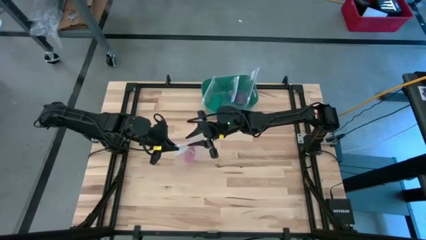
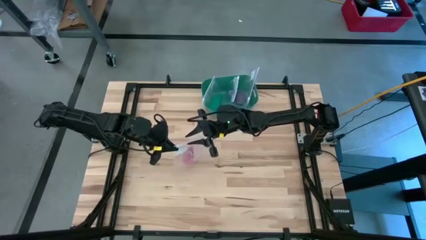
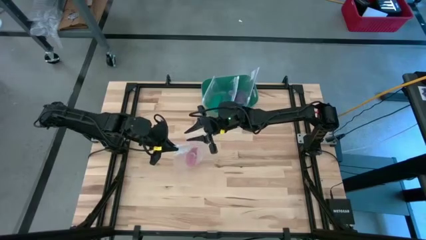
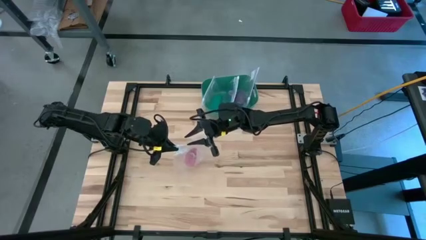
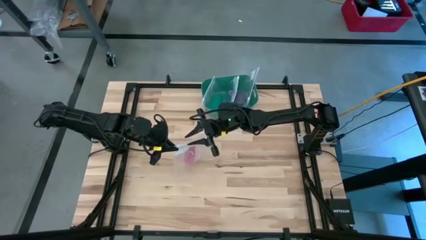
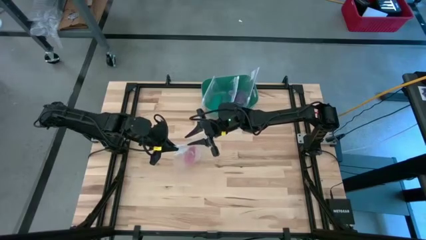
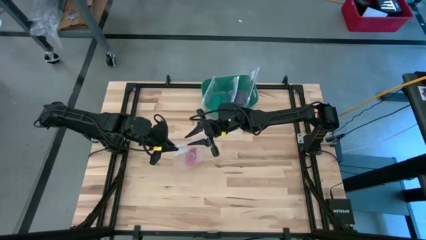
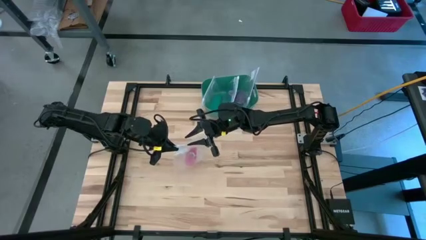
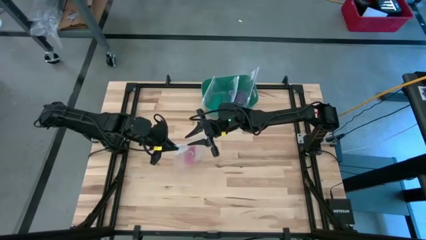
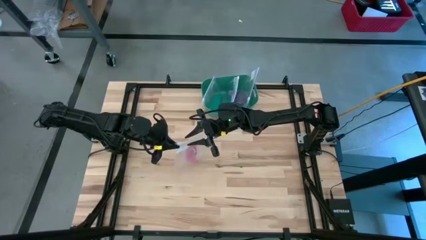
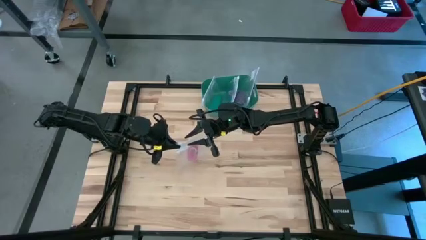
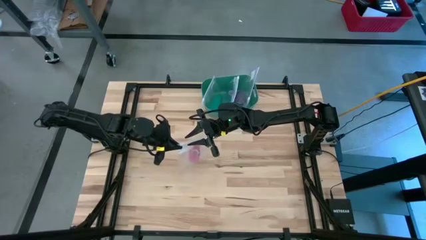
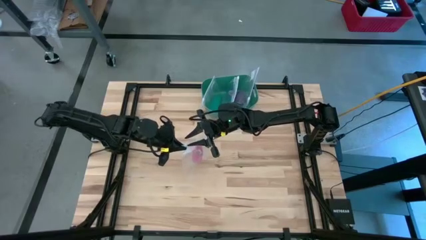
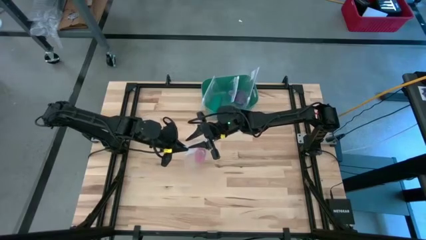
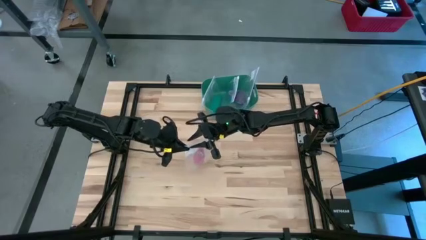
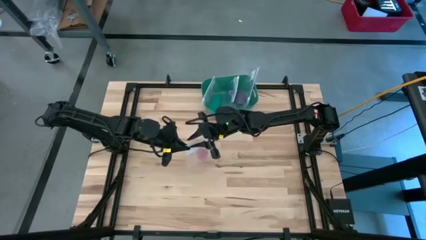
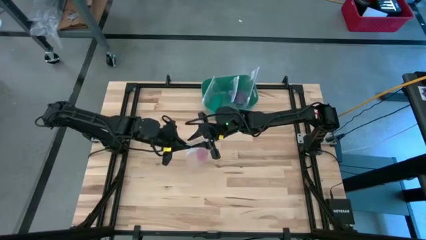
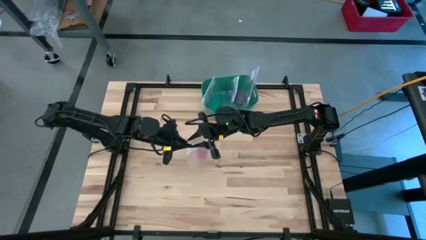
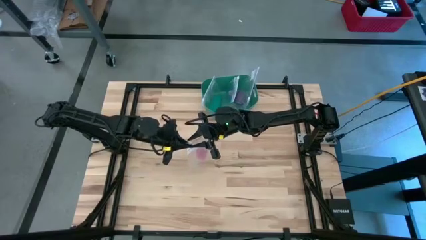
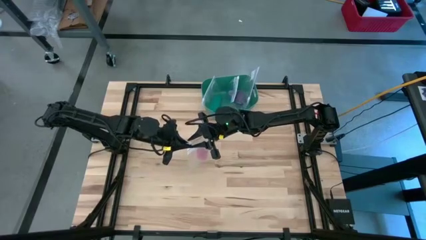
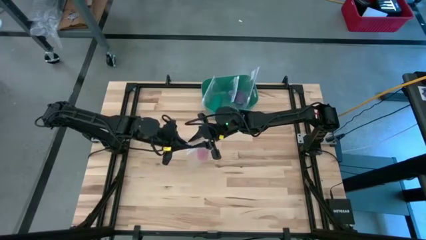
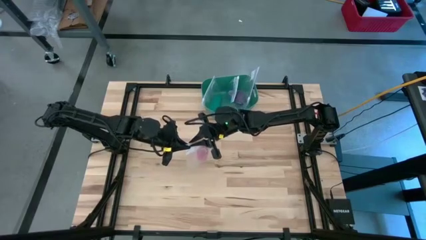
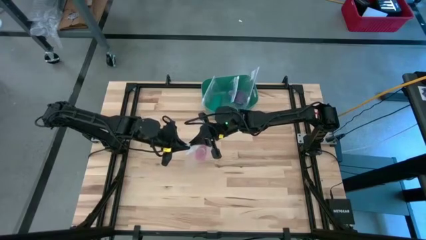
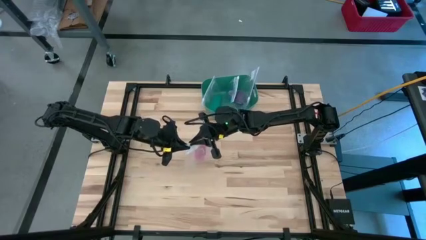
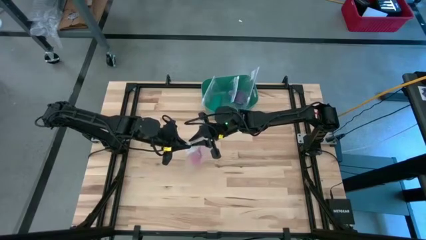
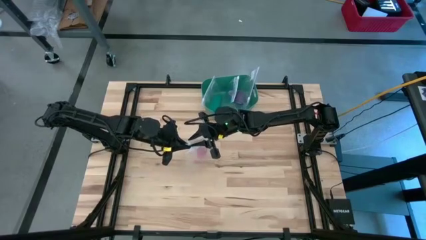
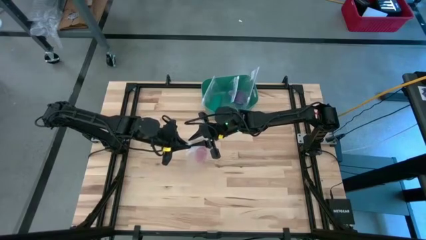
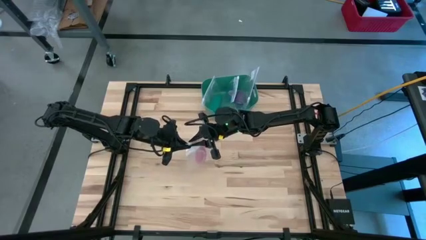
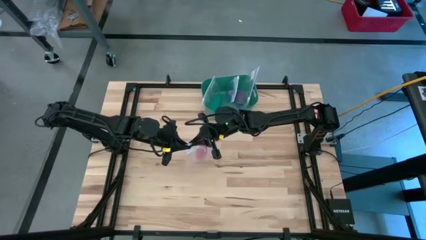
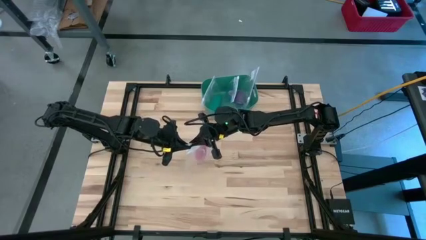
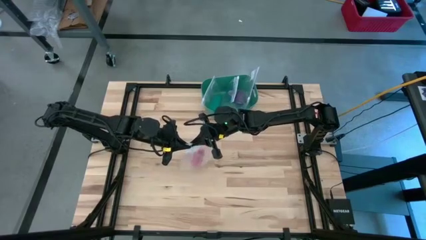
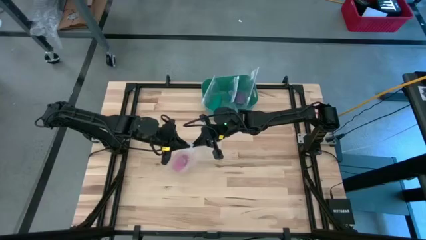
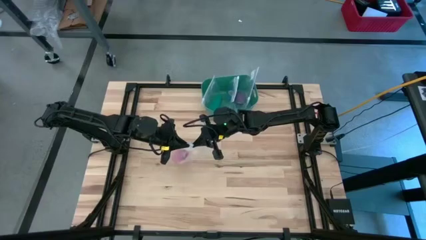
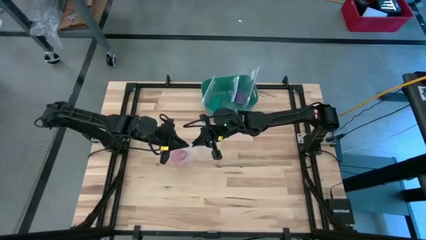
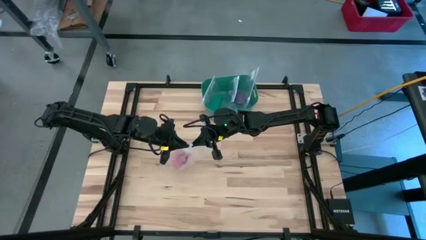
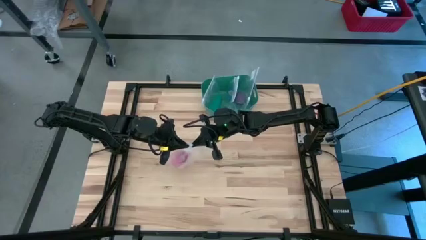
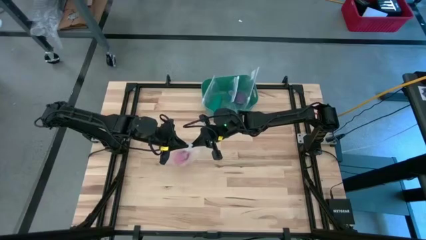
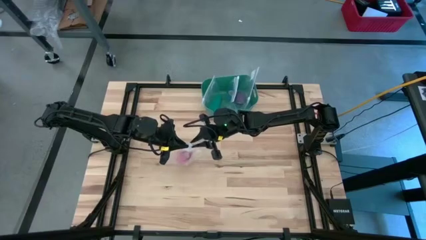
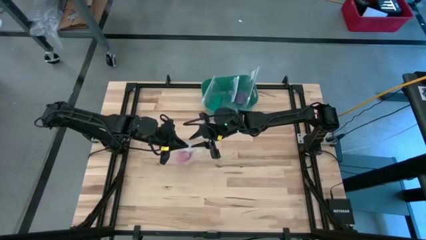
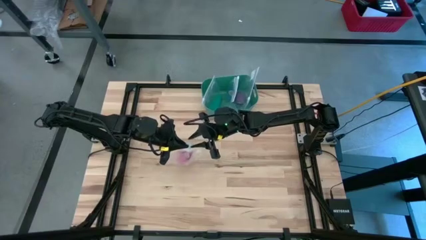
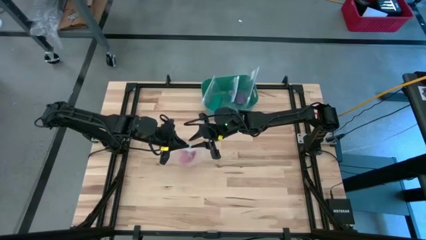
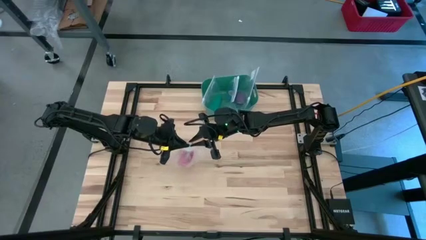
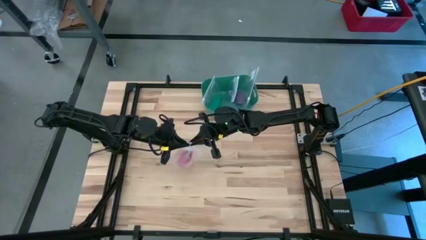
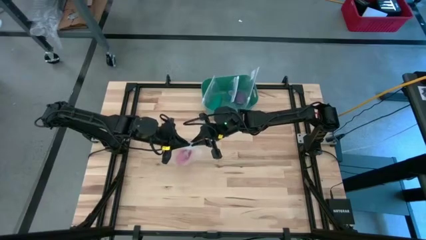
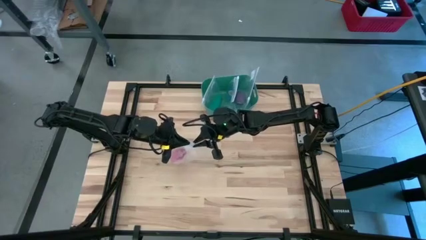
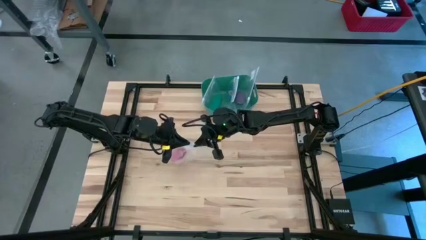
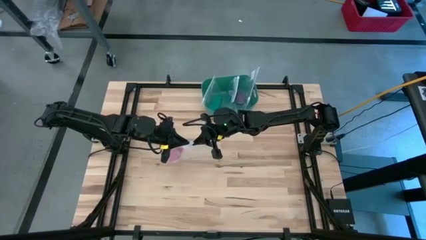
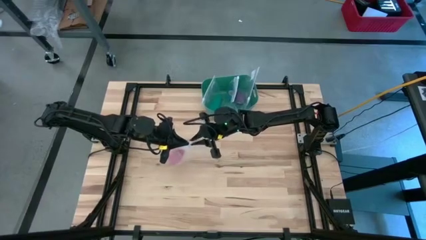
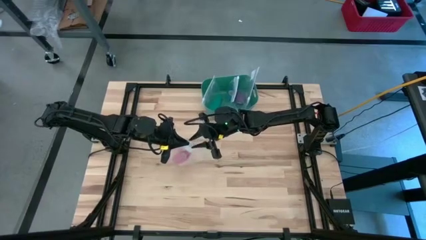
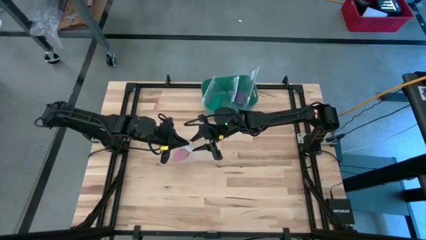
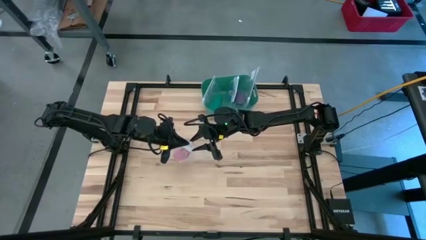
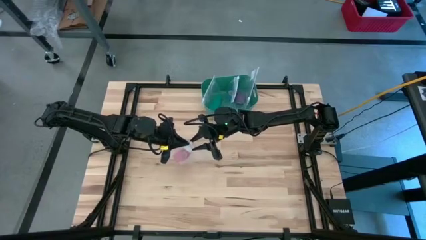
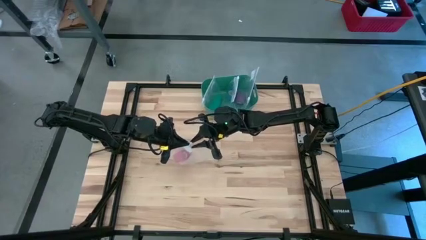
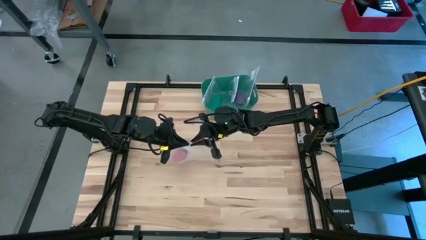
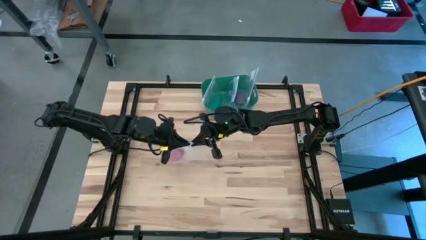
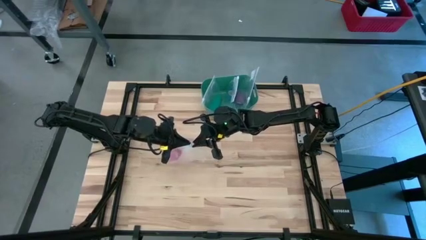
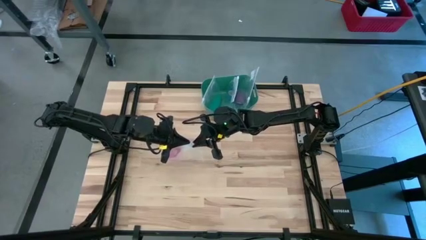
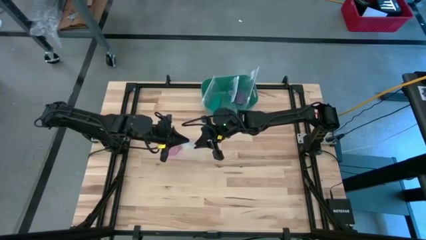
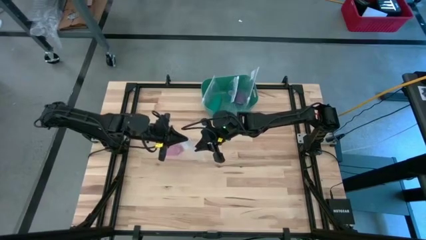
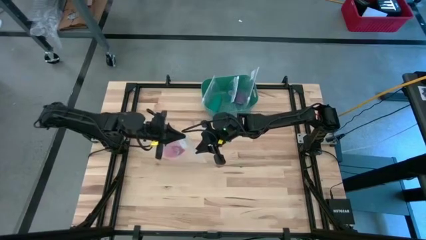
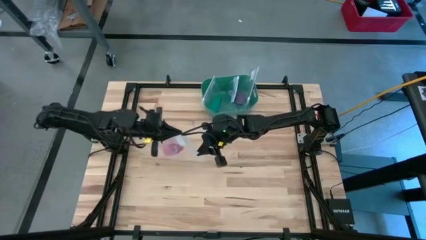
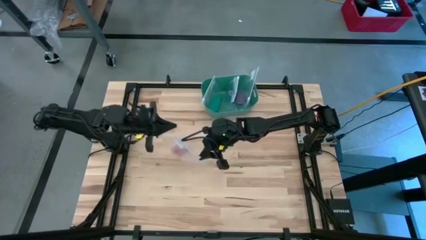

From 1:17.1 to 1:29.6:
Task: Roll bandage
Close the transparent zip bag

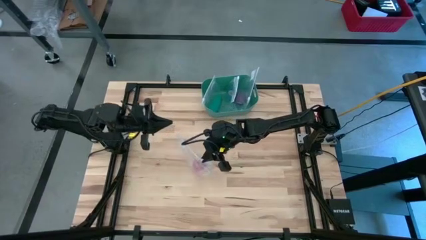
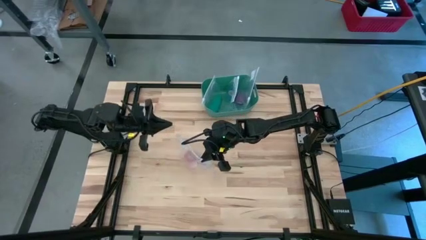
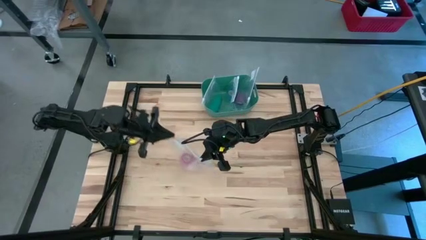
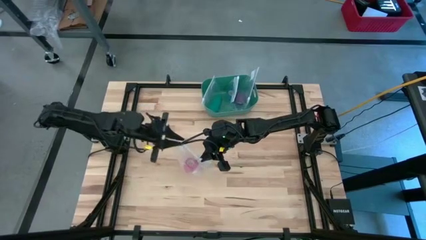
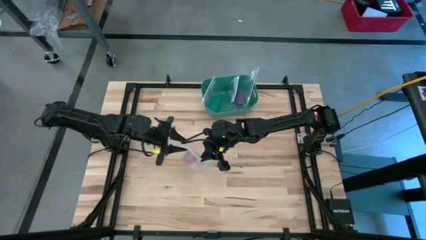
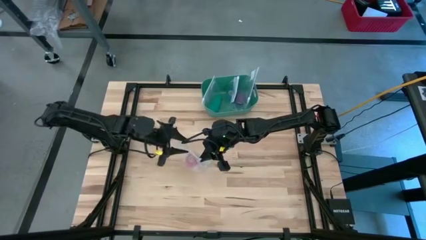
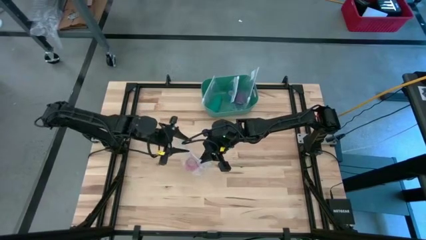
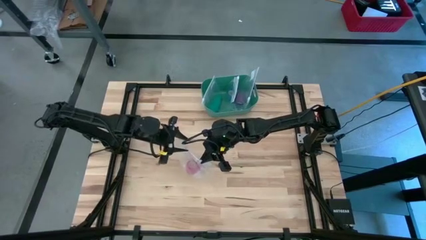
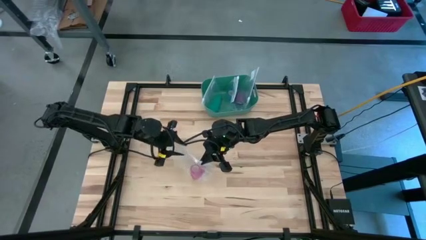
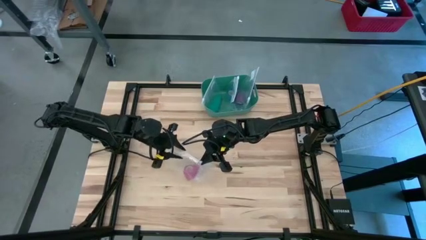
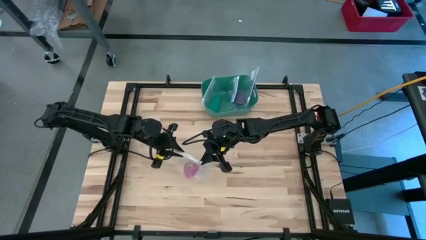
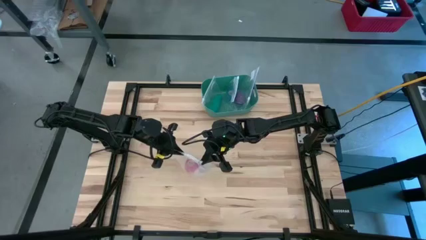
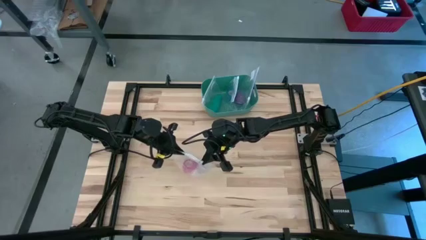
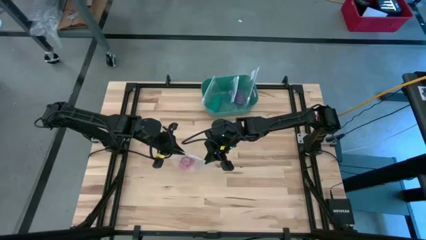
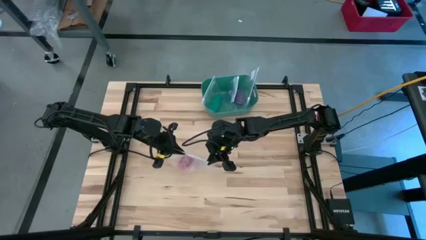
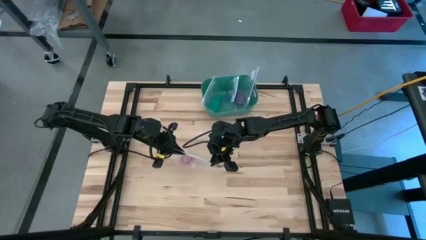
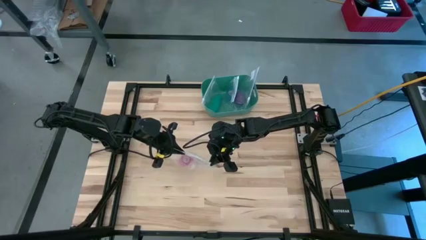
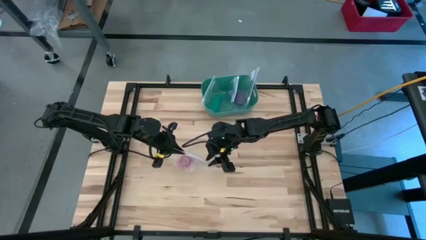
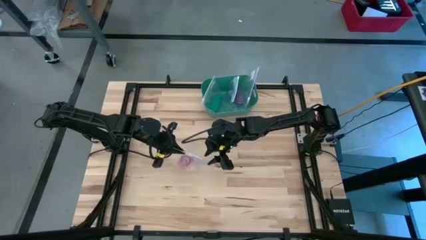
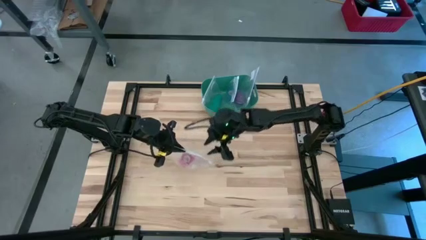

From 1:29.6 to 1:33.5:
Close the transparent zip bag
